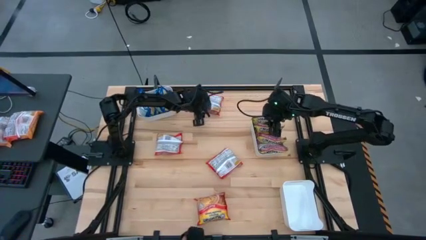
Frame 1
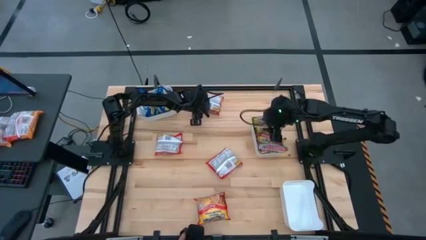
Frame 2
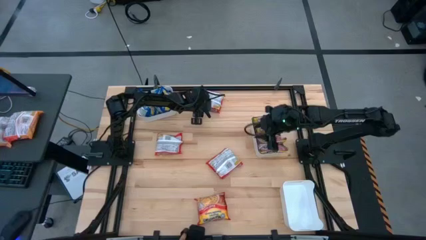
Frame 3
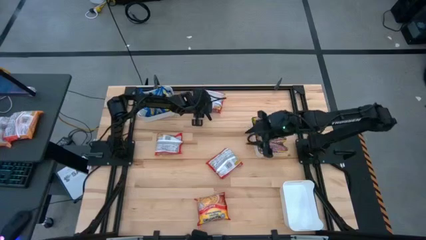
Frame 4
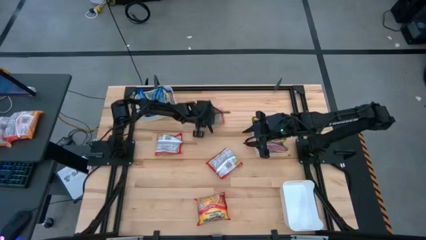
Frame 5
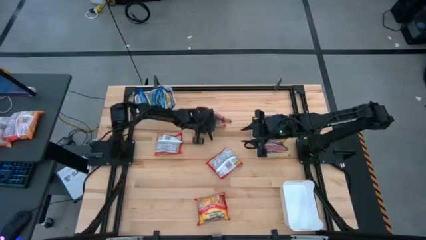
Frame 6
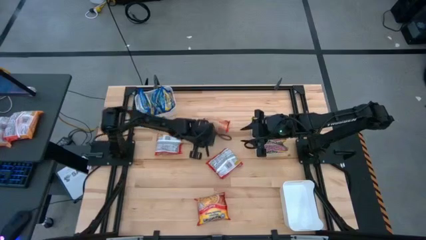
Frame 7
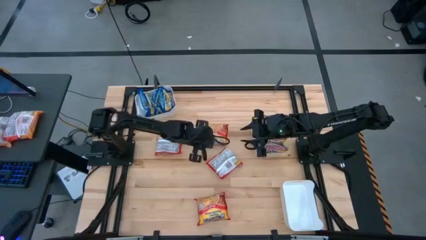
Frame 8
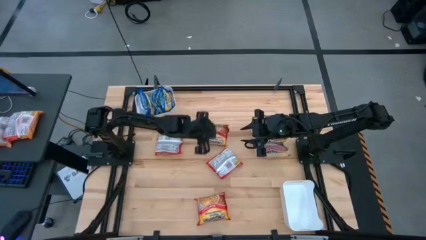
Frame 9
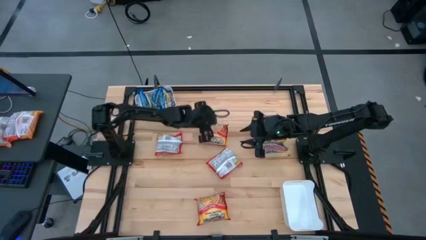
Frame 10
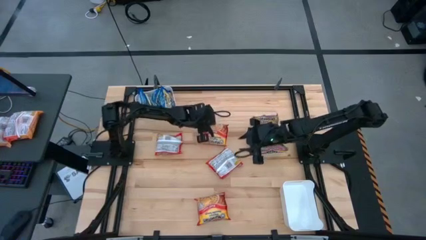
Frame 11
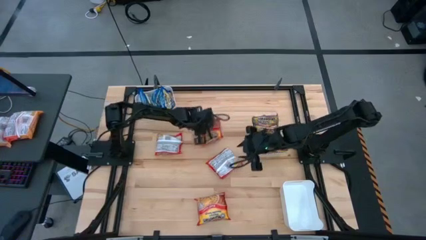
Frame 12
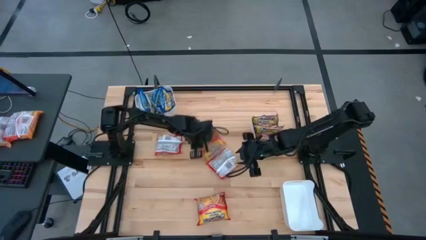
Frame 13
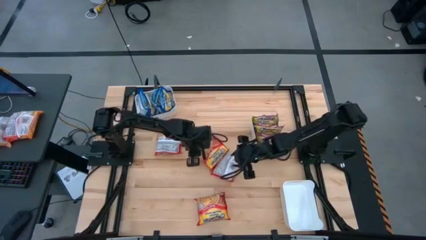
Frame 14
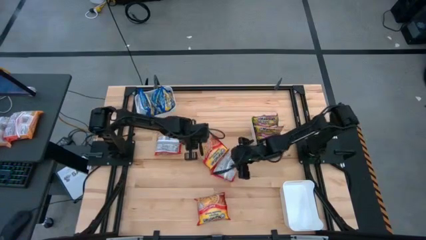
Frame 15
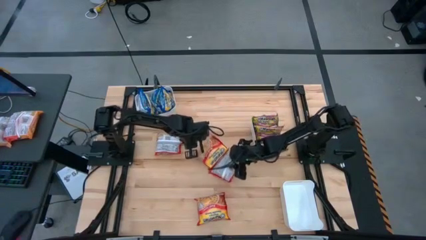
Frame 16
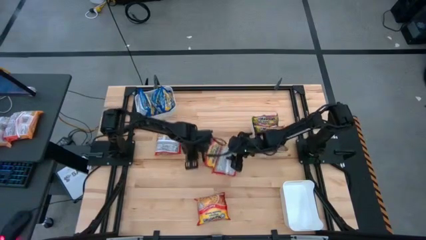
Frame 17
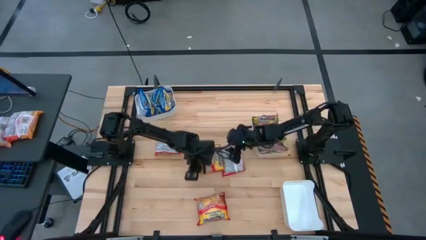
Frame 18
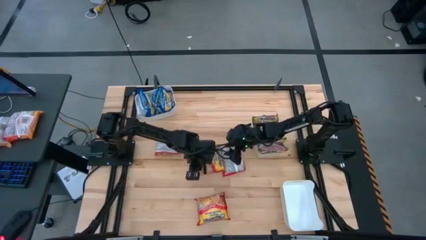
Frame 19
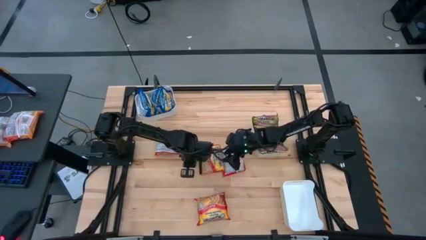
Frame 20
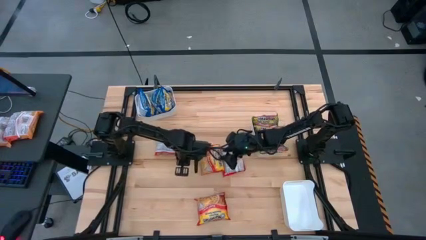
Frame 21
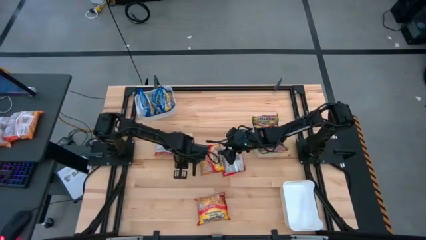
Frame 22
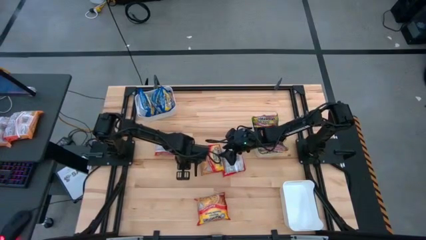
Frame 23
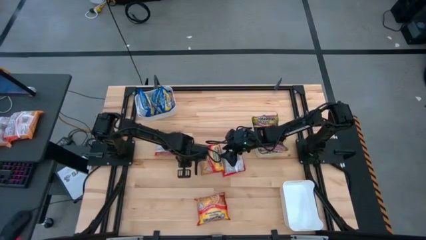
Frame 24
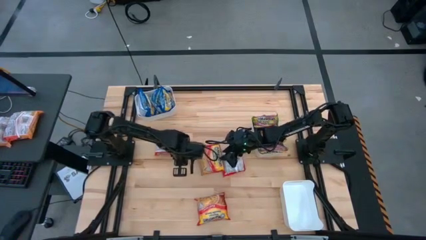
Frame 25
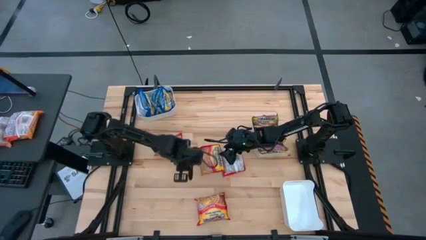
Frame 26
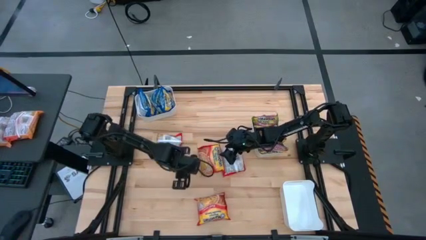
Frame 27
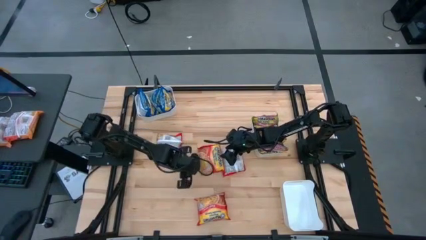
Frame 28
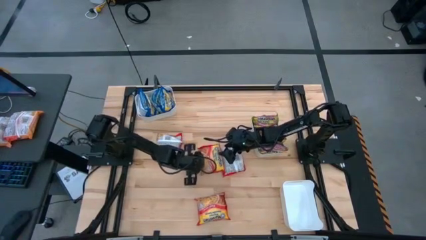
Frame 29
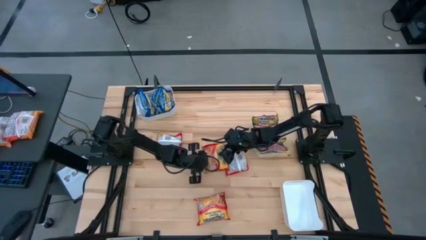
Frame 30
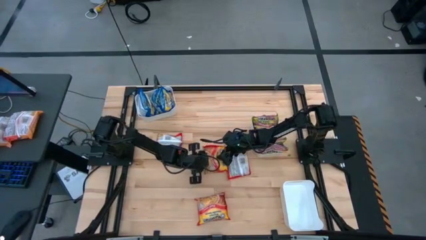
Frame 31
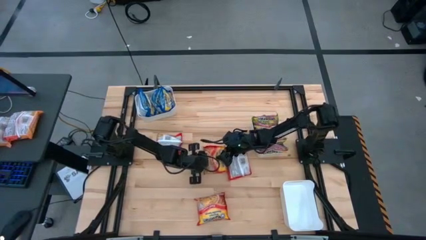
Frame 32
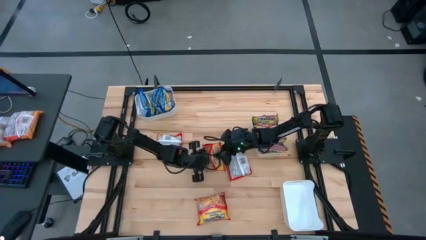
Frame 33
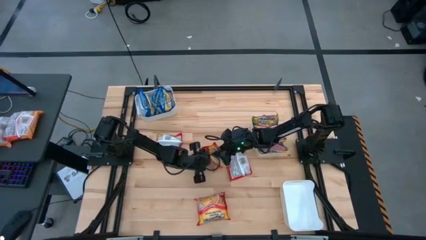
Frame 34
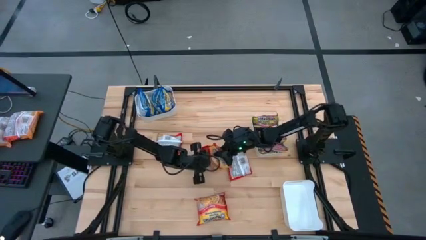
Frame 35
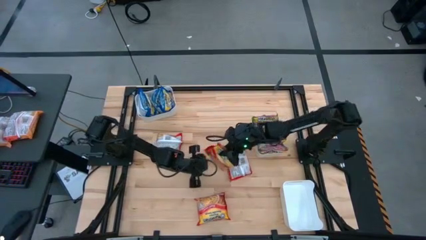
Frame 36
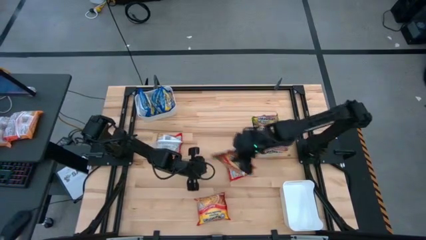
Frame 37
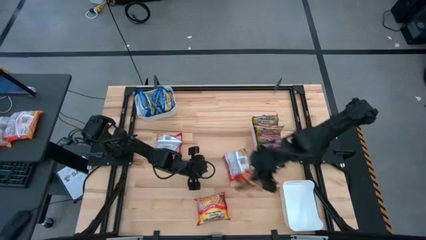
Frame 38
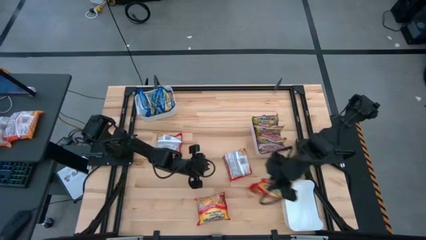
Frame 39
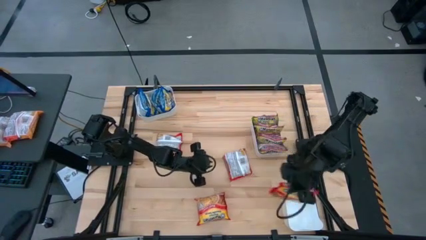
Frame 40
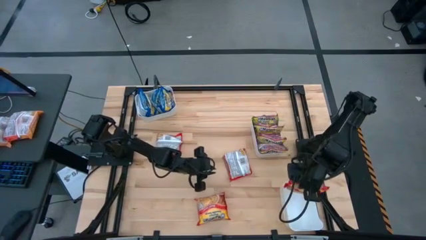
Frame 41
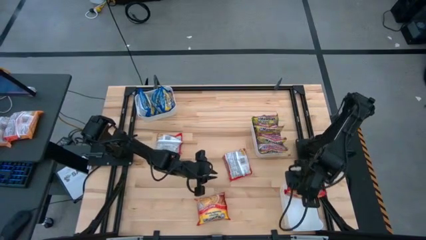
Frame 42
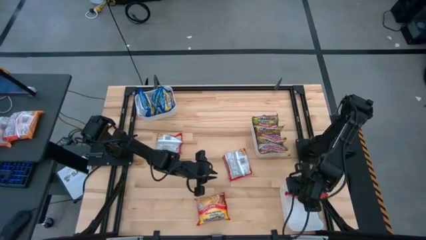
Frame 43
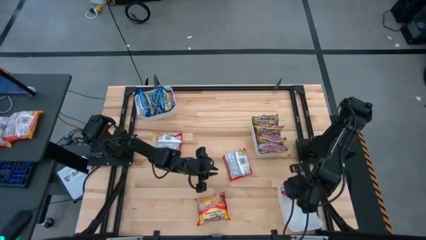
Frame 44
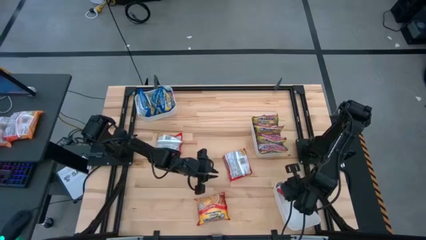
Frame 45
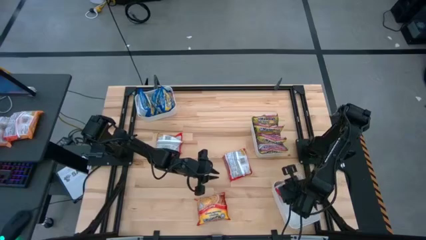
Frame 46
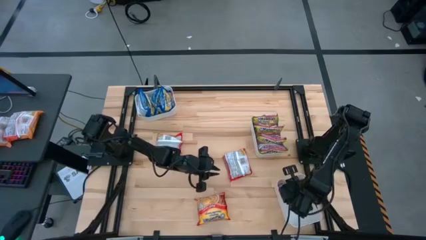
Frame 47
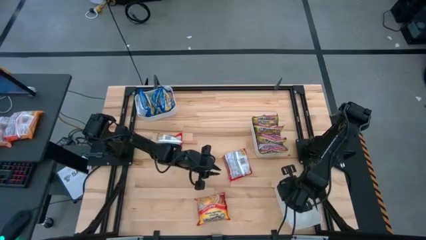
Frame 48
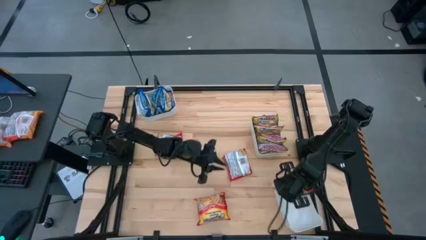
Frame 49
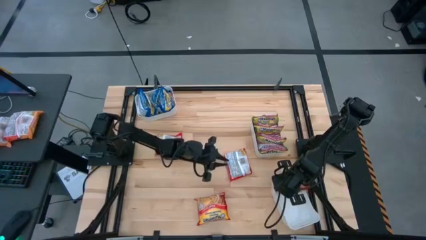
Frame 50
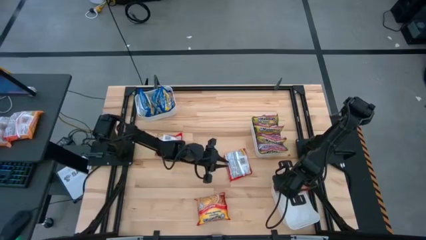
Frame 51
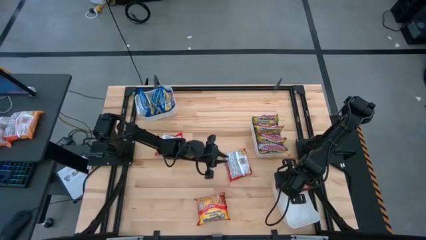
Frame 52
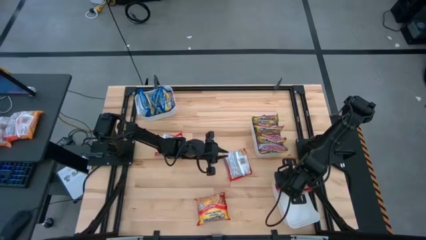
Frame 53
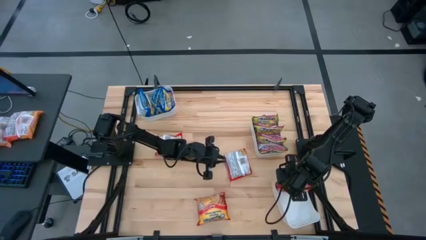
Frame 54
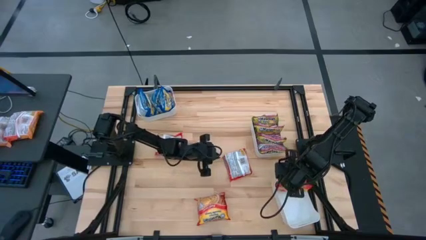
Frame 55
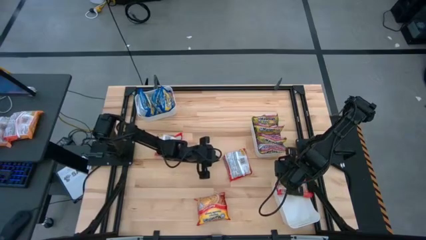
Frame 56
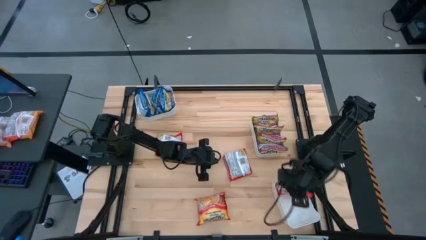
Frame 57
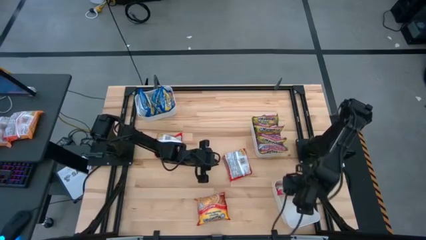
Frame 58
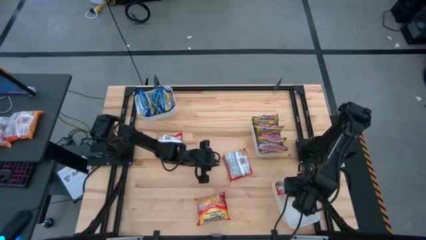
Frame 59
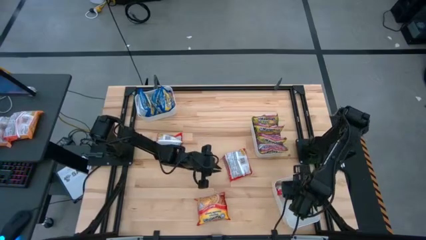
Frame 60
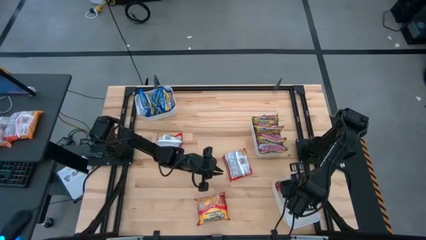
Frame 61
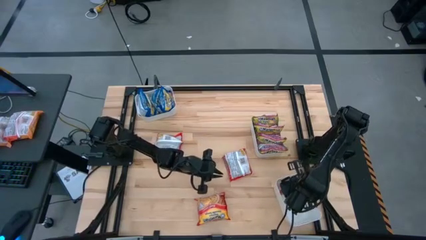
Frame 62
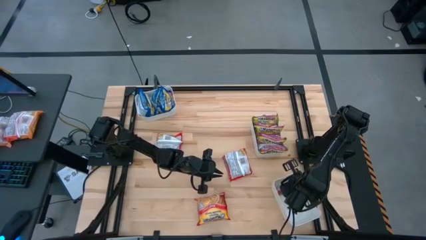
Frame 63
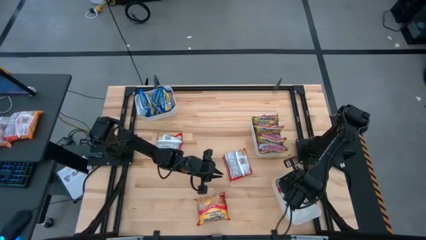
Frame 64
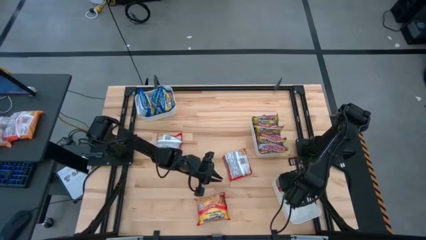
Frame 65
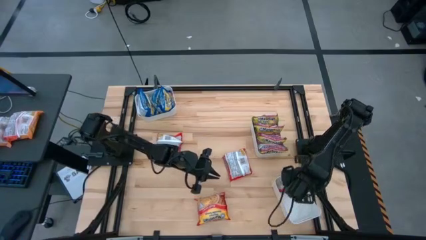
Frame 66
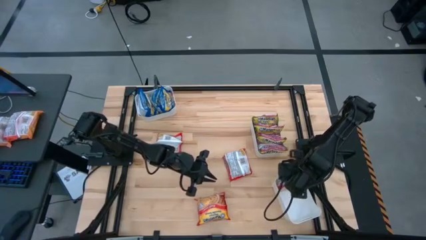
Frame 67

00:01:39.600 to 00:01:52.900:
Task: Sort Maruchan noodles
Put the red noodle pack into the bottom right white bin
